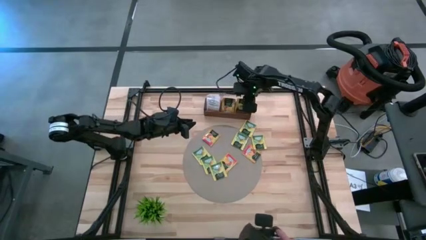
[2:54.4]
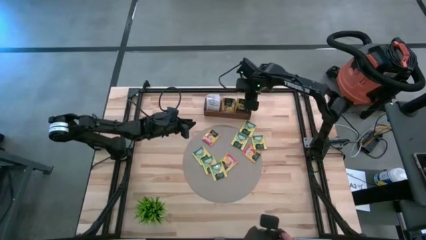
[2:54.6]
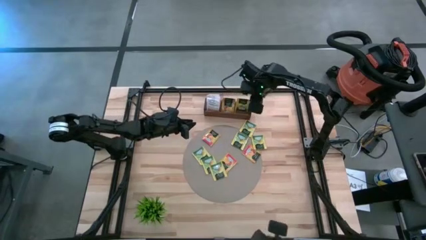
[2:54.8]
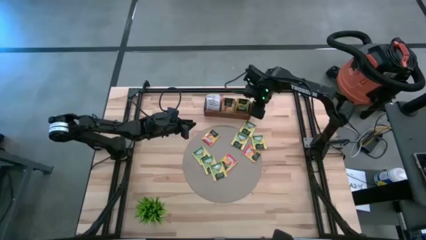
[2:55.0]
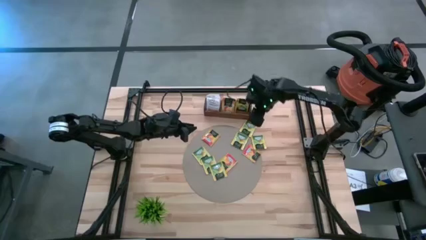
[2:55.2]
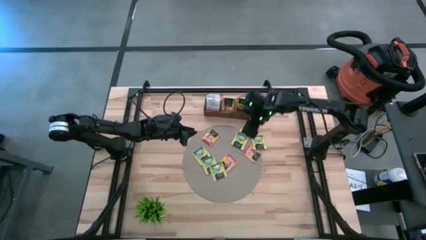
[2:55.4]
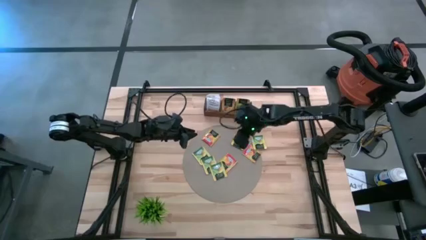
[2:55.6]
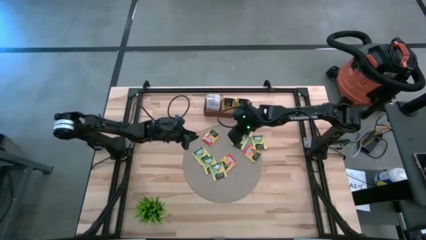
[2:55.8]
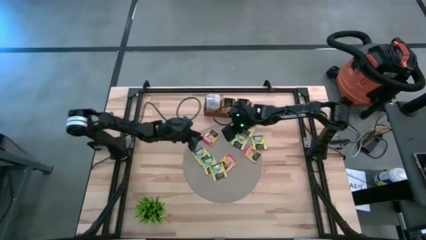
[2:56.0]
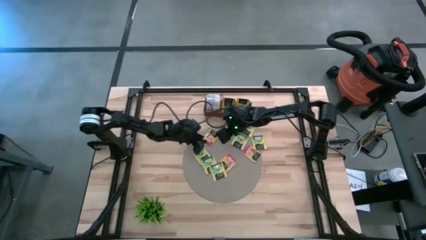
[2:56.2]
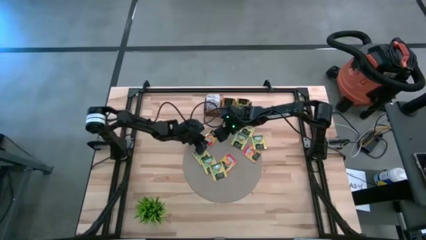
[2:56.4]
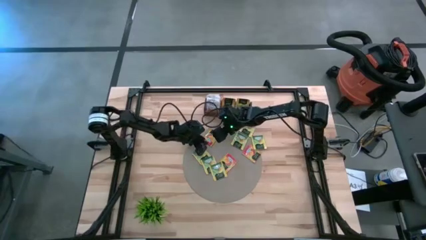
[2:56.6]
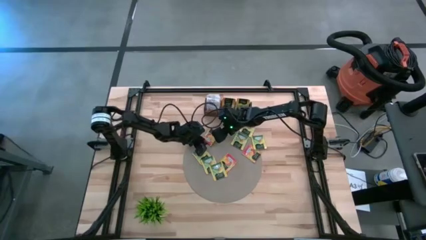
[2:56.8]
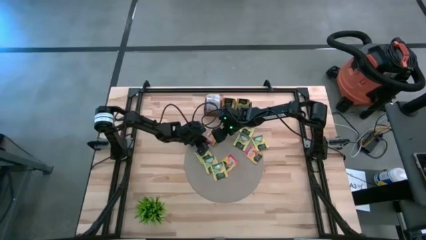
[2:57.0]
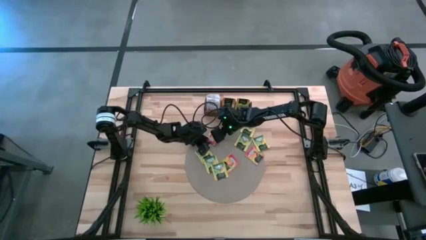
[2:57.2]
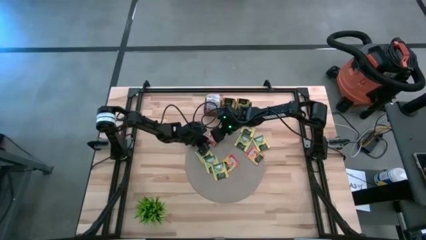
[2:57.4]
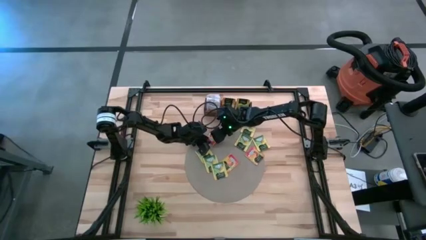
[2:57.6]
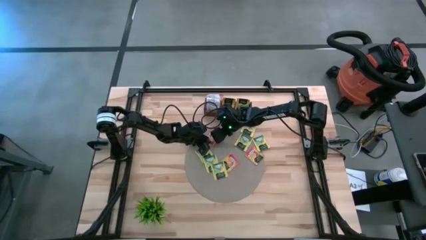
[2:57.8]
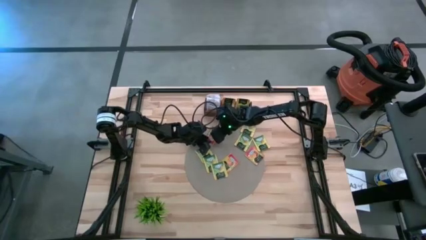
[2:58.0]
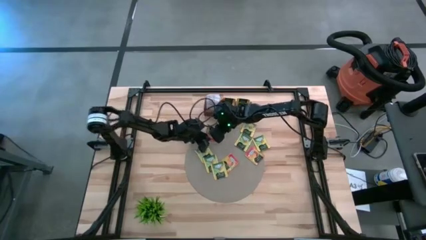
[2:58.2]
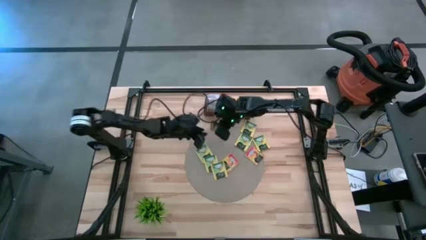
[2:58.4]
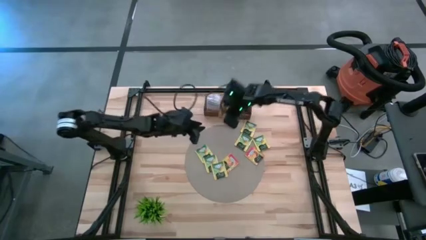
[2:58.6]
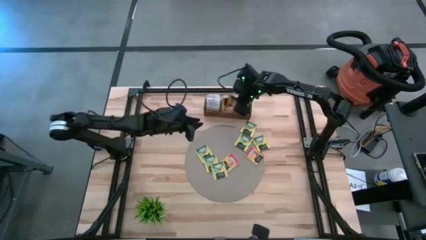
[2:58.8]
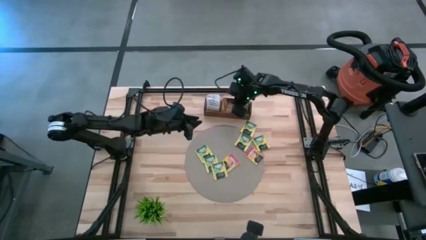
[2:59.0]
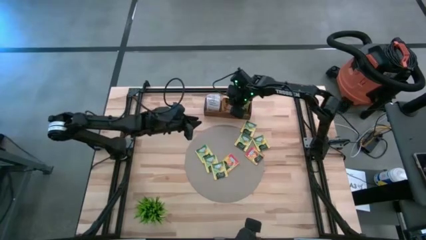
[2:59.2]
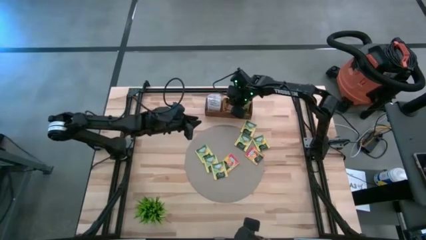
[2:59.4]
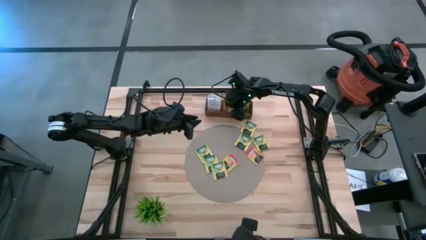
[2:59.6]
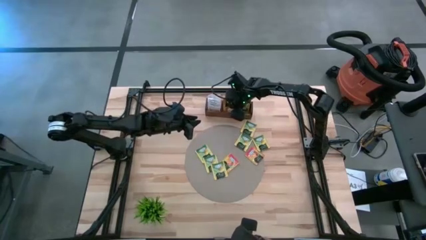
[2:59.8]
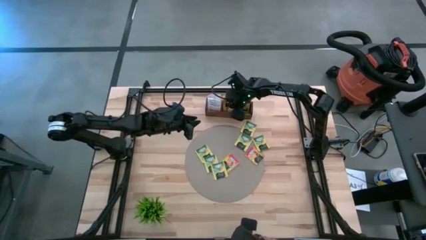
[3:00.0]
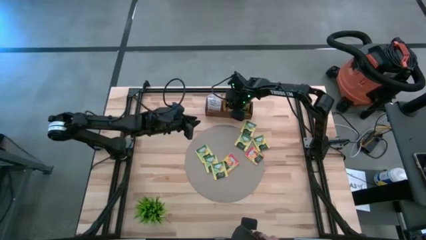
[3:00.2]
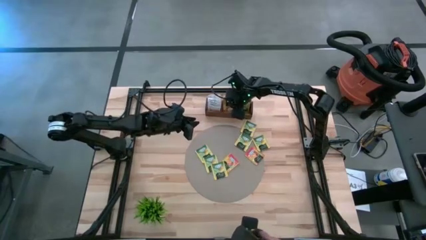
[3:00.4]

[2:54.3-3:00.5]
Task: Pick & Place Tea
Put the orange tea bag into the middle section of the wooden organizer

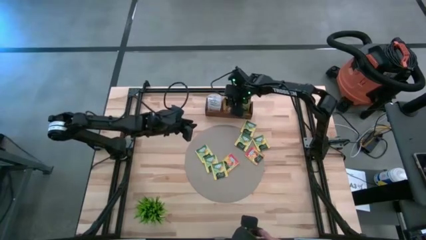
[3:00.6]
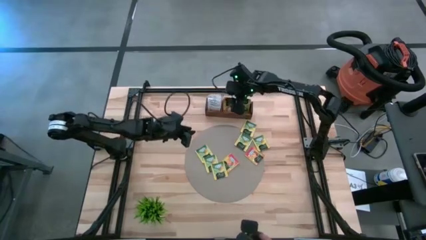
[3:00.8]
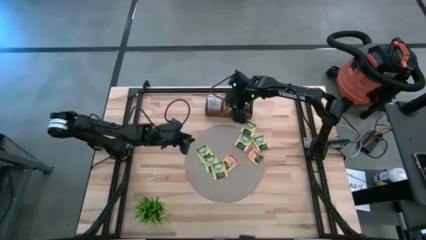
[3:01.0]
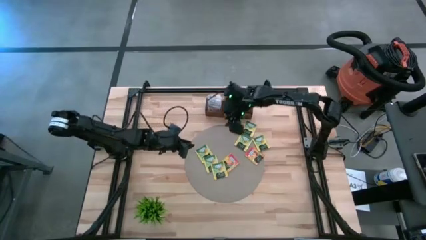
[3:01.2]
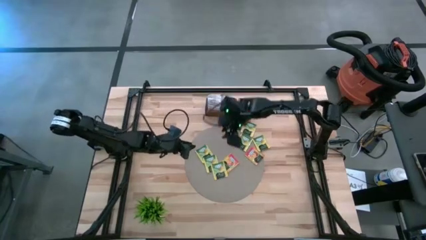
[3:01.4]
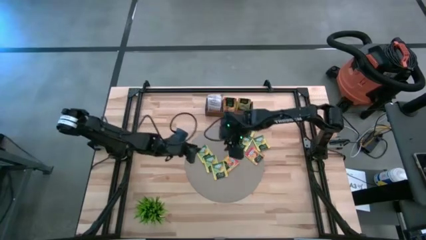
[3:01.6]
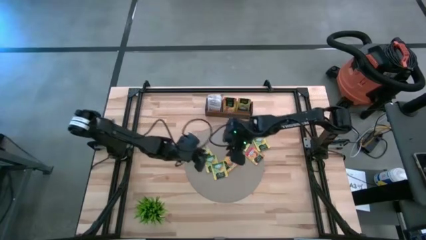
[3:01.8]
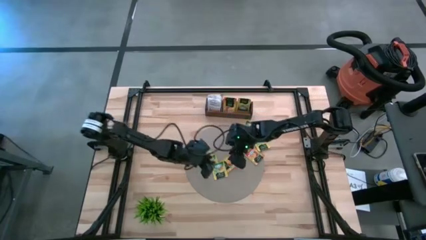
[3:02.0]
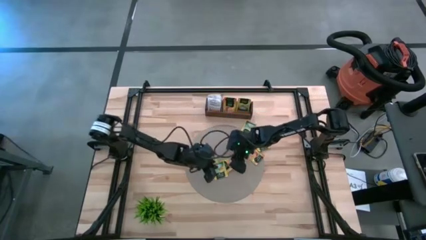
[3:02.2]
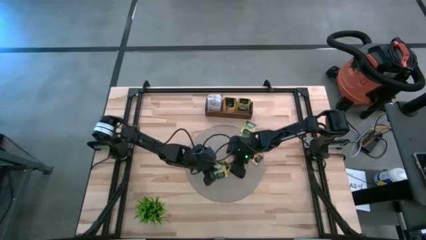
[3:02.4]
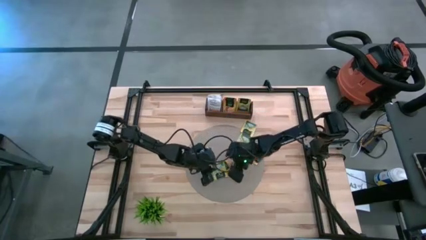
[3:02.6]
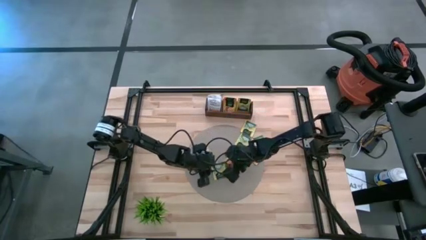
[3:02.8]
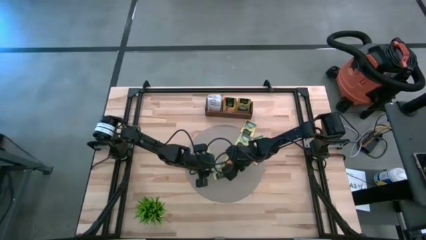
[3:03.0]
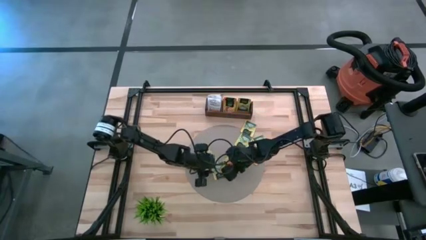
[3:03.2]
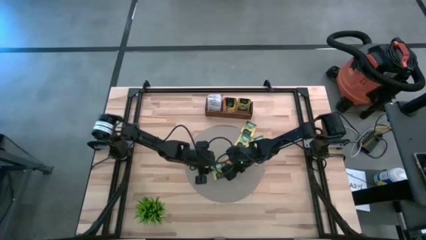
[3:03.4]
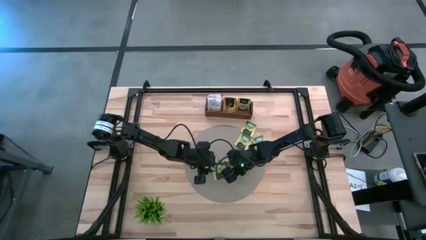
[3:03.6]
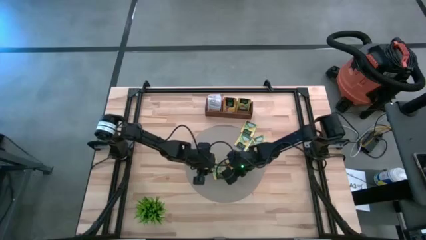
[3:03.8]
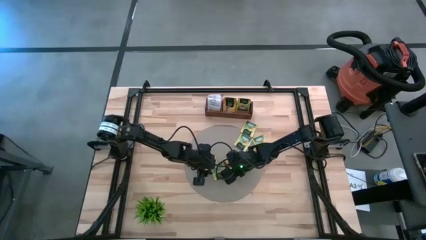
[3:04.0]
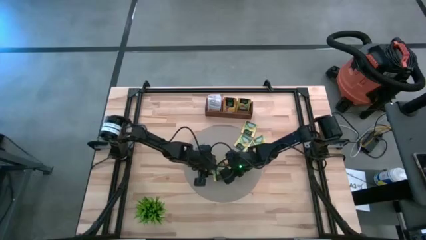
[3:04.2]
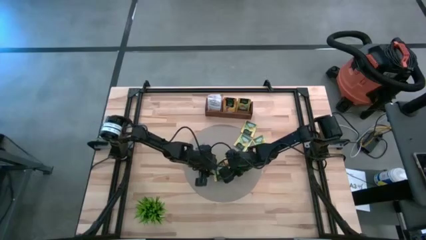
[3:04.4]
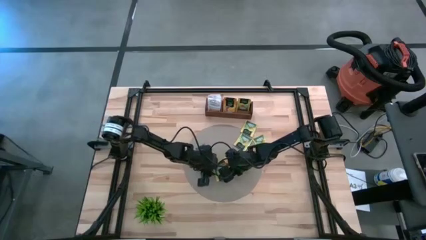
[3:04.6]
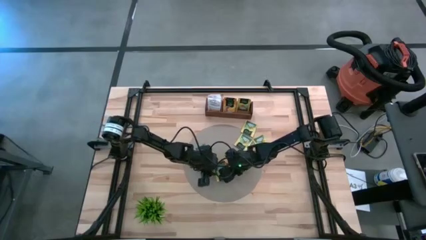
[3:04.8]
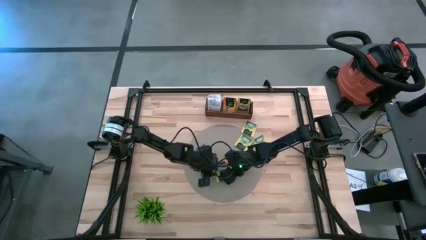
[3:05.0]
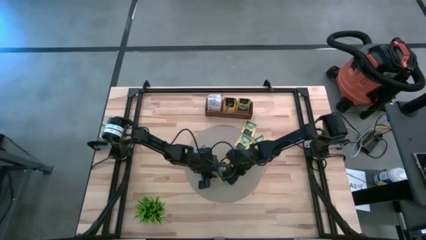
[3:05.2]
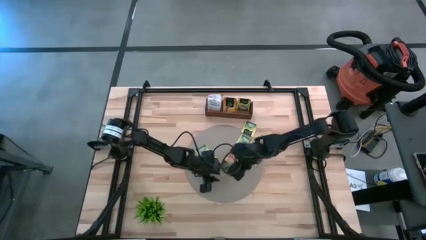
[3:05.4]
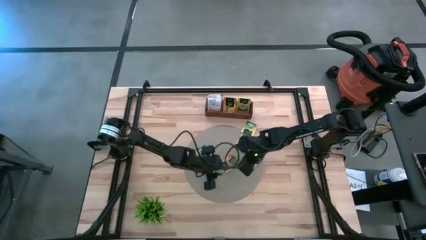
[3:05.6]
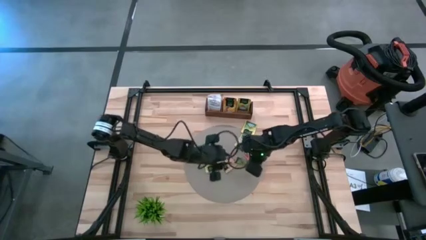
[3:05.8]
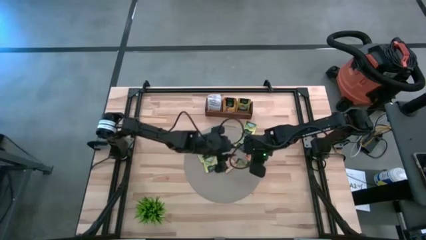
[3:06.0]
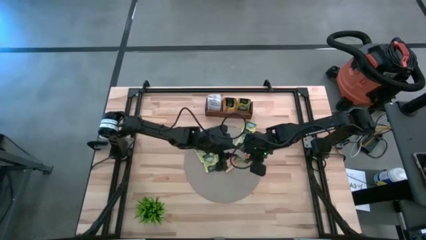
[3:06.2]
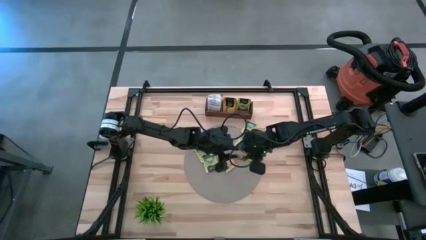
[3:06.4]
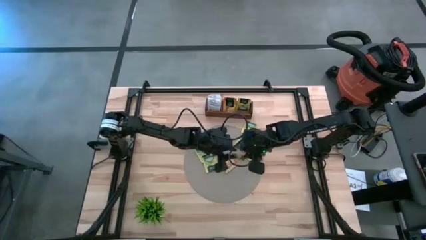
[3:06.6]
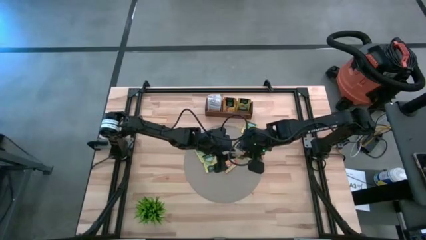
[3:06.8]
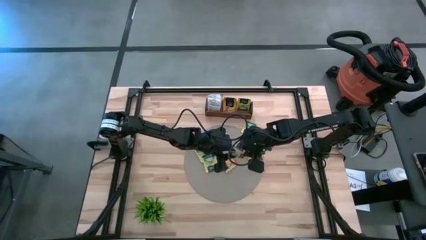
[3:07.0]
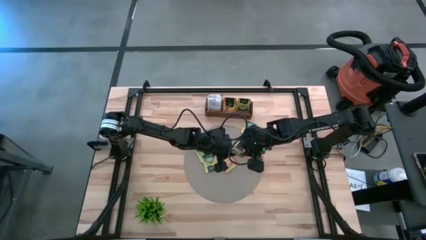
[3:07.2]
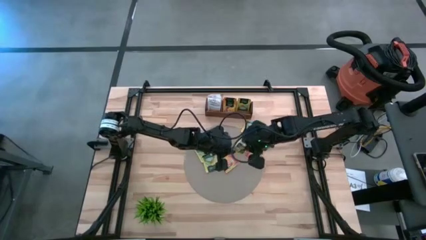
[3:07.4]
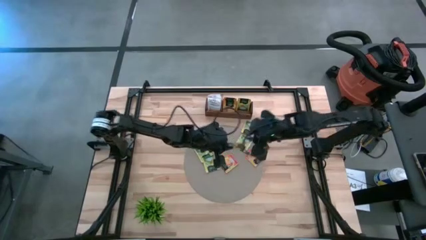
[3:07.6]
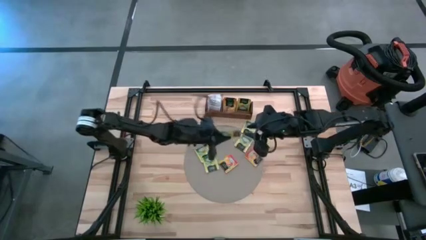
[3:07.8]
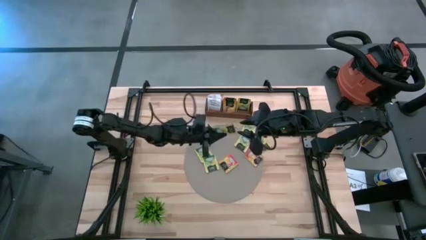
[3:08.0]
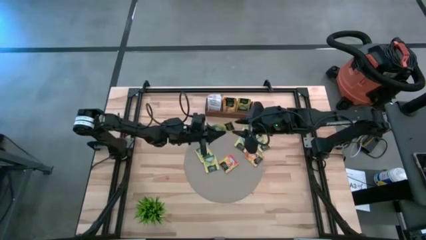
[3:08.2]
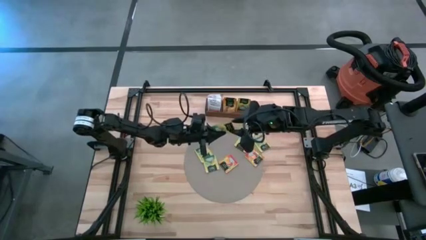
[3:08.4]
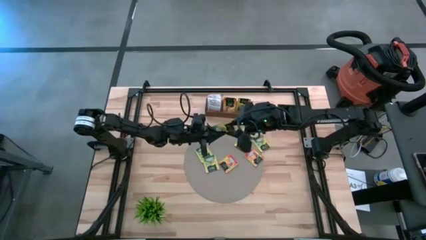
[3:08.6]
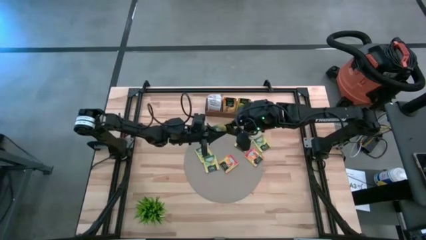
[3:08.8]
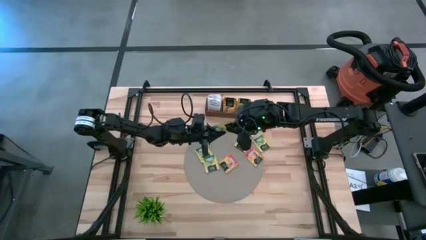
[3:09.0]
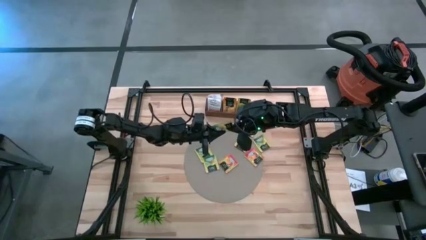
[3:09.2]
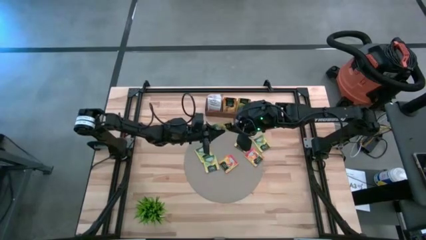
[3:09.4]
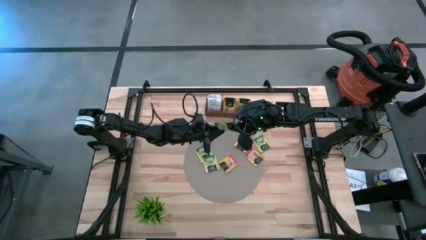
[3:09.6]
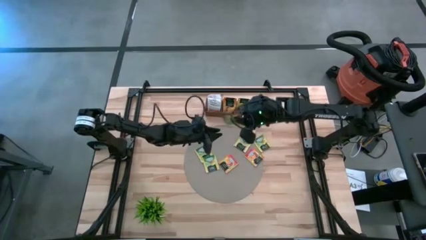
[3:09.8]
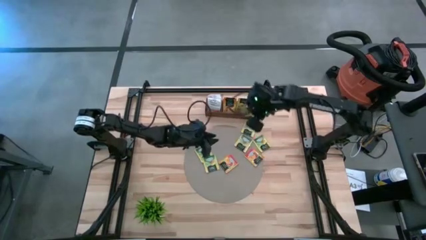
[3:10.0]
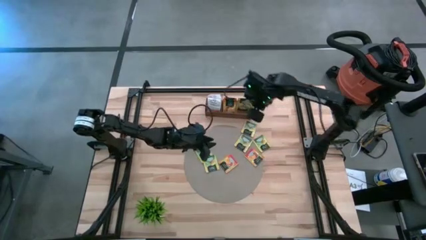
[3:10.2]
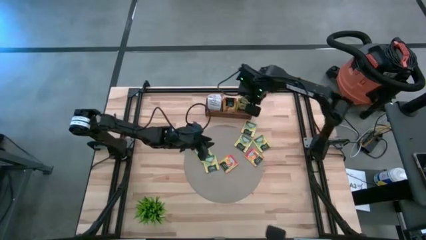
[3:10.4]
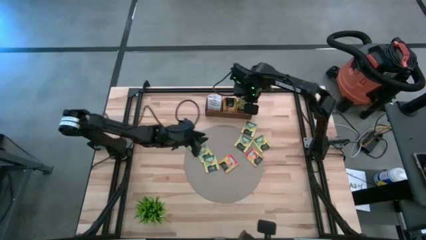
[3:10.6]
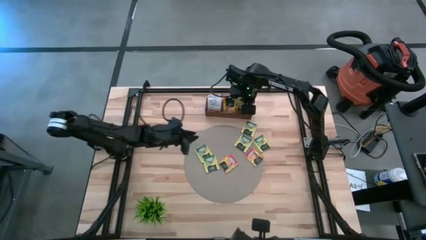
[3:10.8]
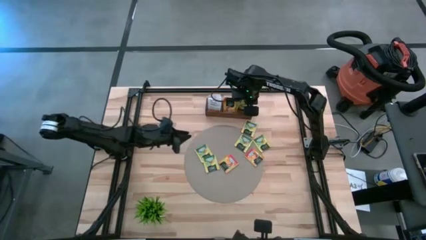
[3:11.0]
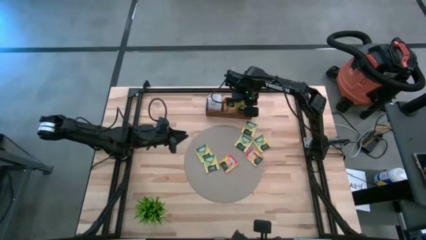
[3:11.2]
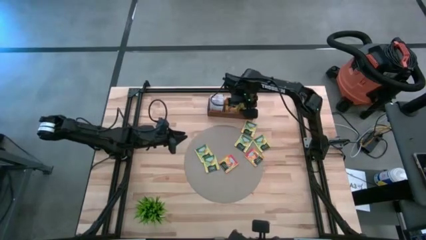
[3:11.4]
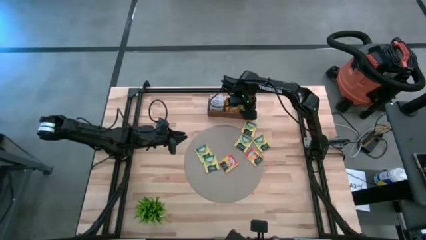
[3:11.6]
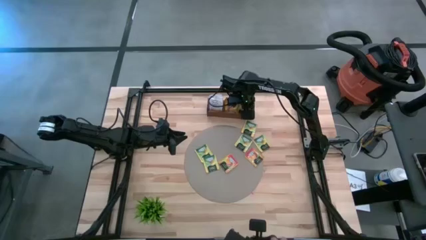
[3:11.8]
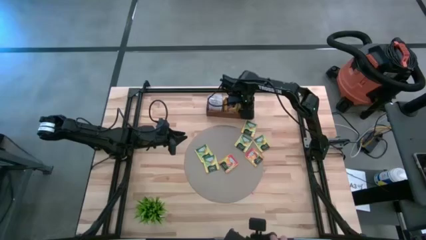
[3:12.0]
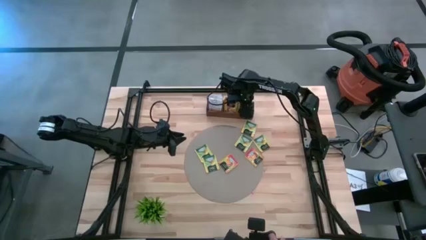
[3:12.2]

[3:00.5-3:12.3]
Put the yellow tea bag into the right section of the wooden organizer
